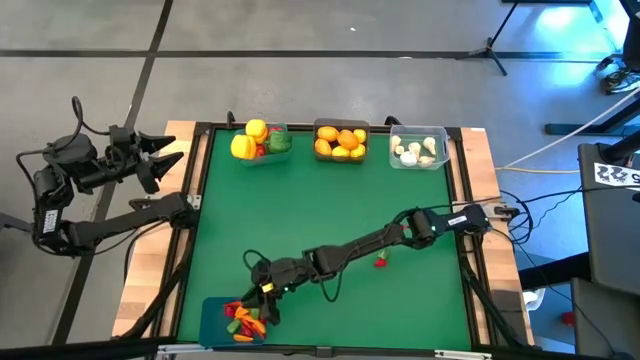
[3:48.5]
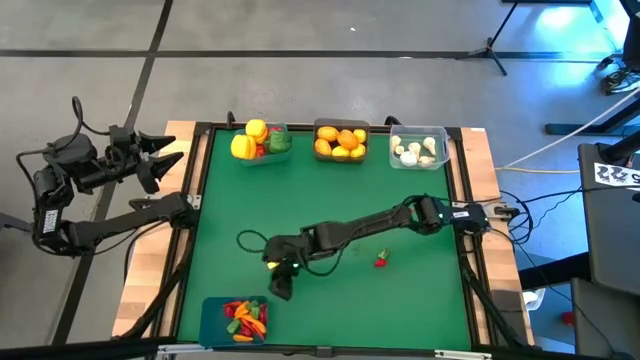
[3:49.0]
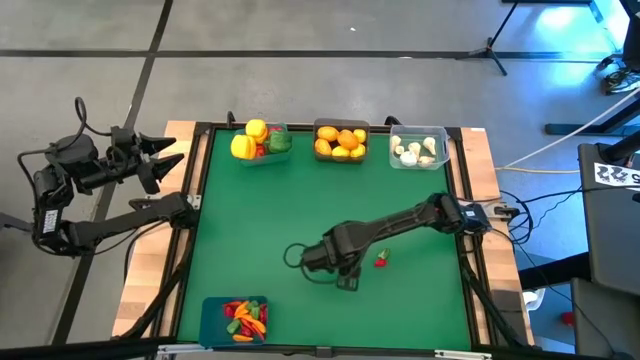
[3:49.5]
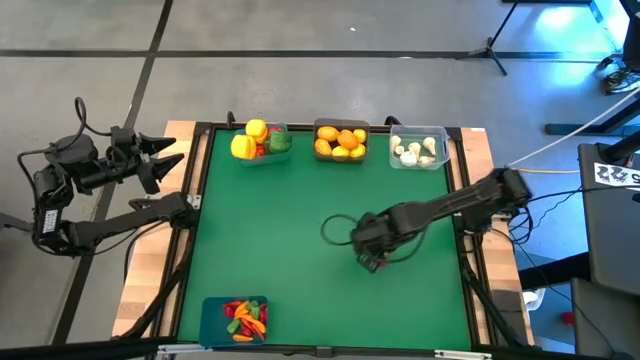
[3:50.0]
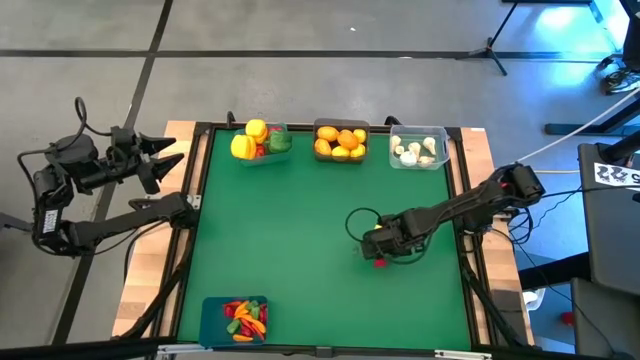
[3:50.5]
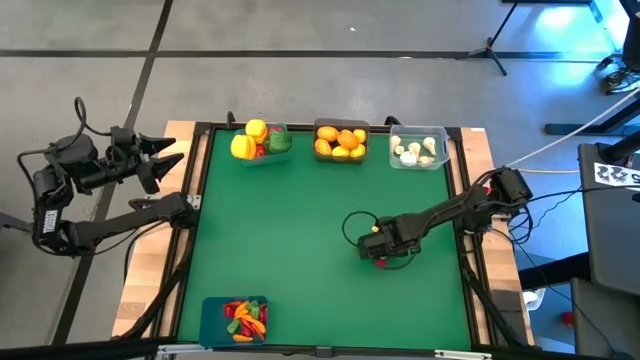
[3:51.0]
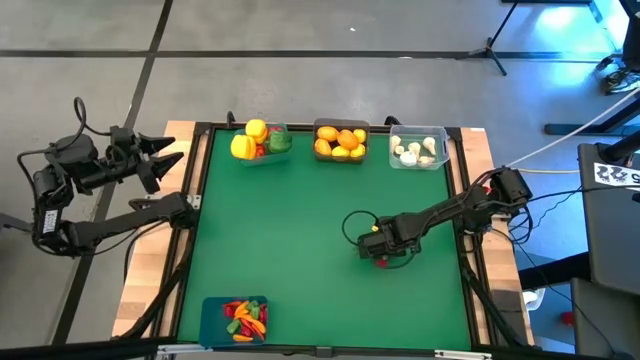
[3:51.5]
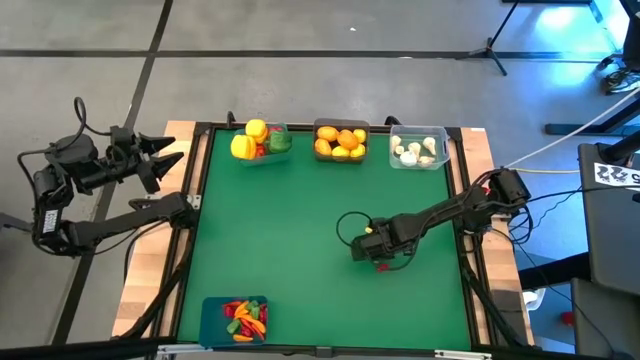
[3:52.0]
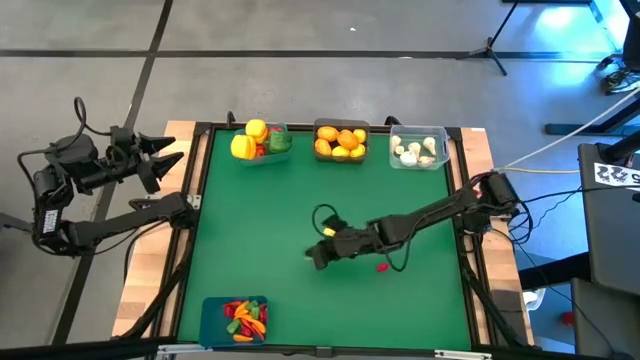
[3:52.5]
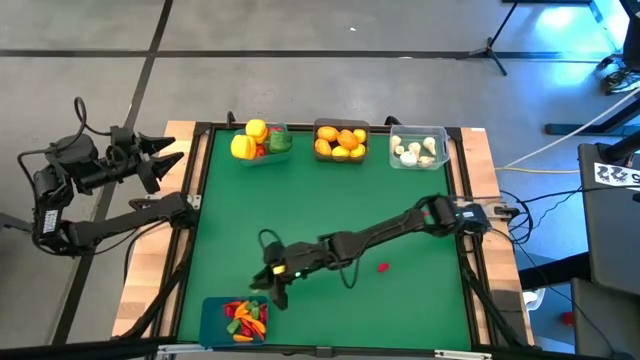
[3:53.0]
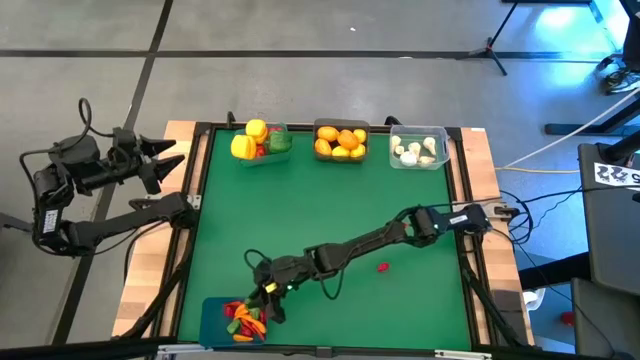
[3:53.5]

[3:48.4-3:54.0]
Task: Sort produce into baskets
Put the green chili pepper into the dark blue bin

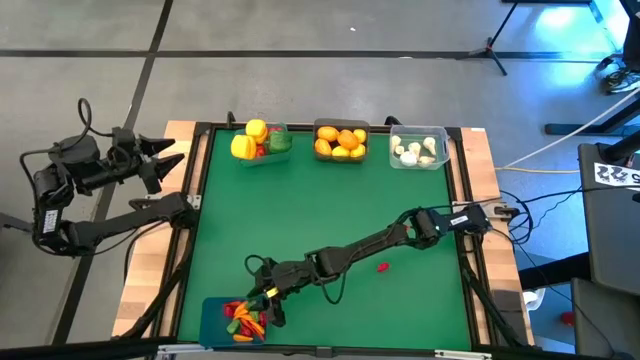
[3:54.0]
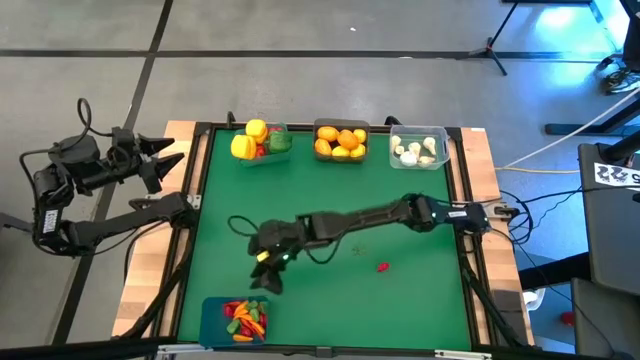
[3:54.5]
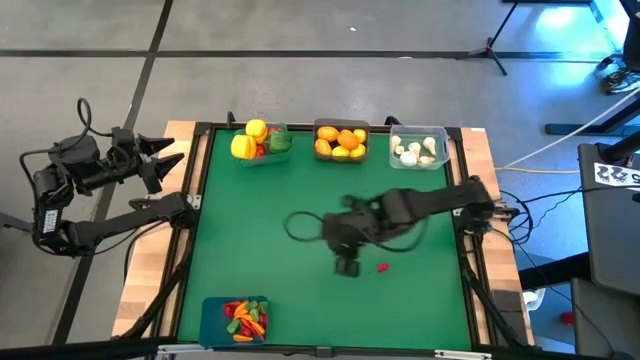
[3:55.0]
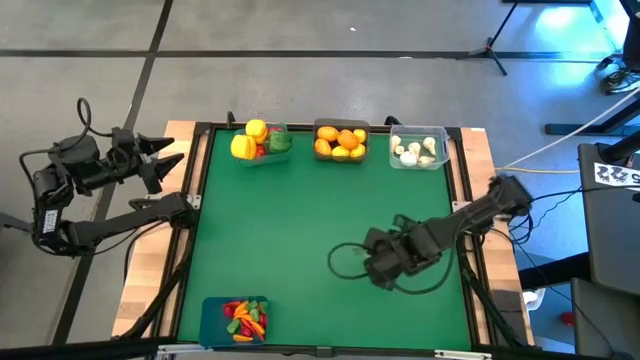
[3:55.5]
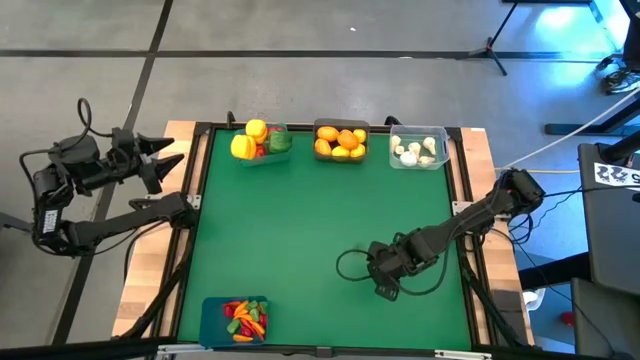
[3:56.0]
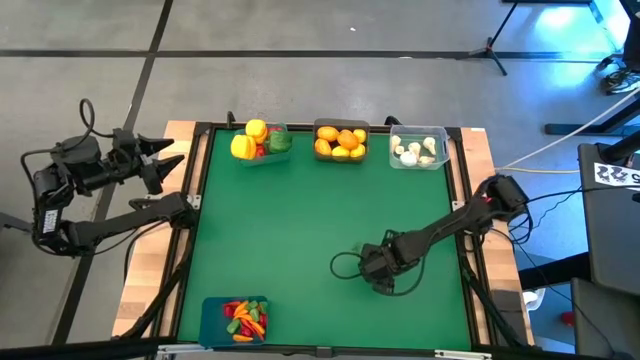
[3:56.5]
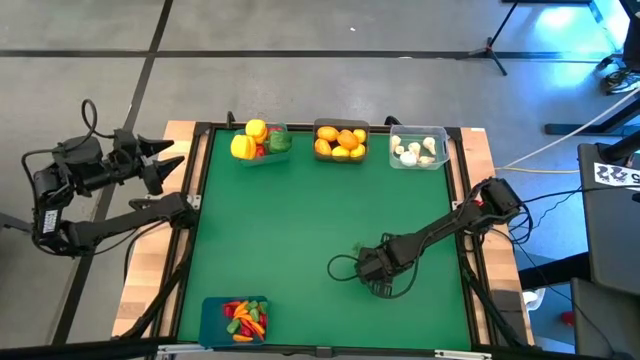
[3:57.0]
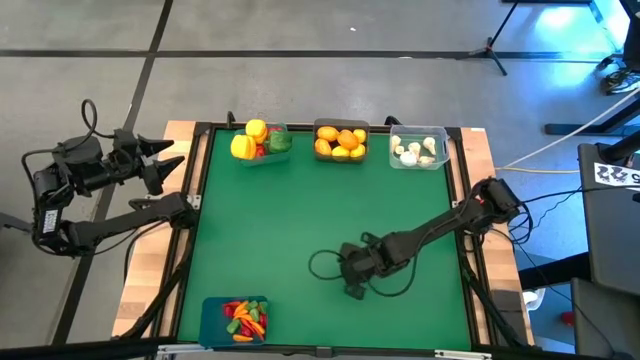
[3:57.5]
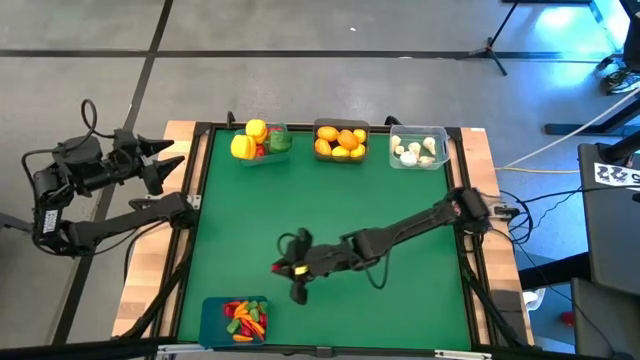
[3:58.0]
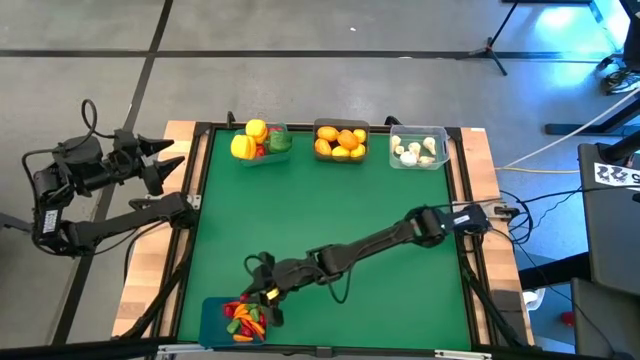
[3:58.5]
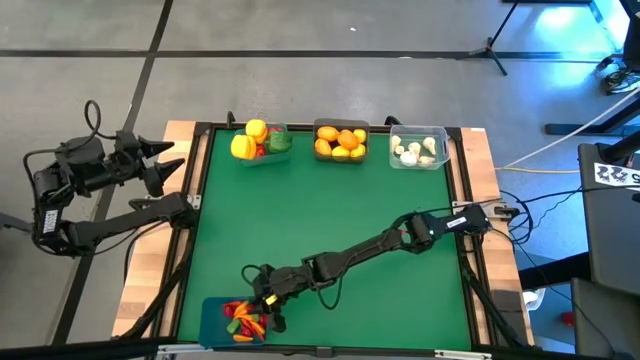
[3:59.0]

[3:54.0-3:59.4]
Put the red chili pepper into the dark blue bin

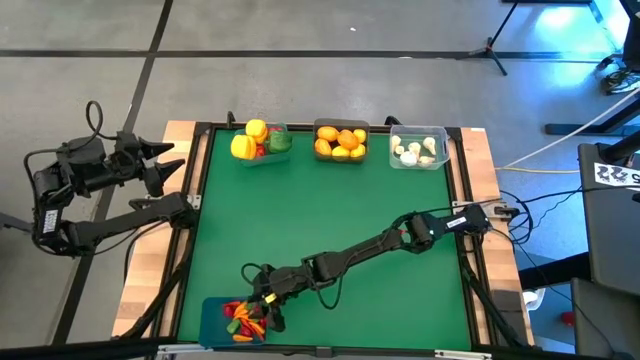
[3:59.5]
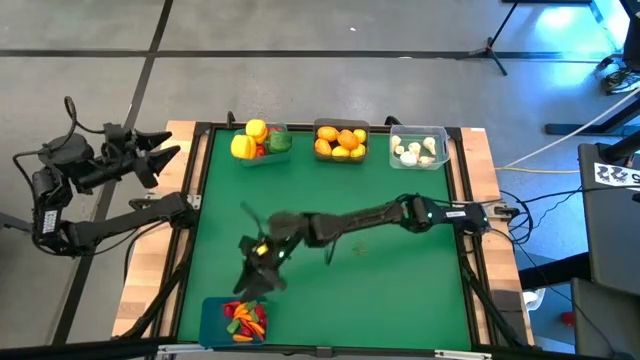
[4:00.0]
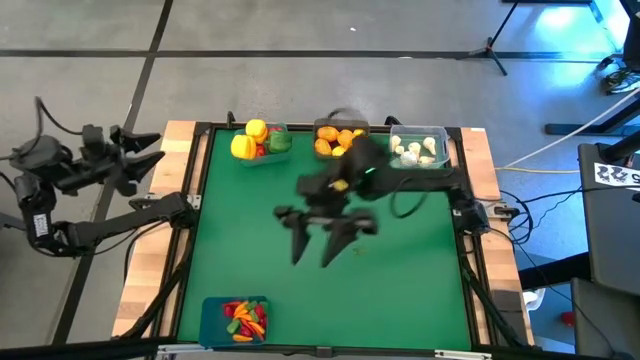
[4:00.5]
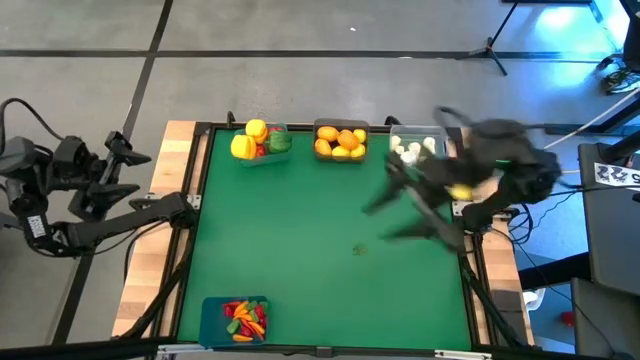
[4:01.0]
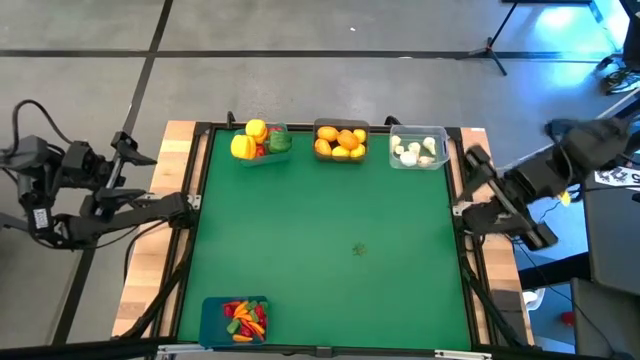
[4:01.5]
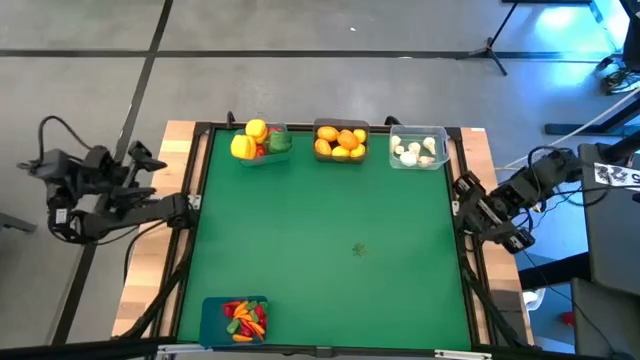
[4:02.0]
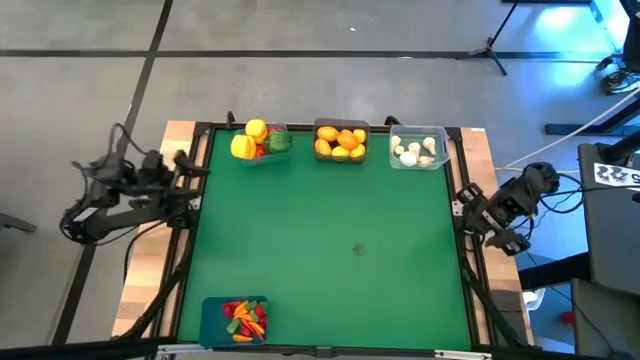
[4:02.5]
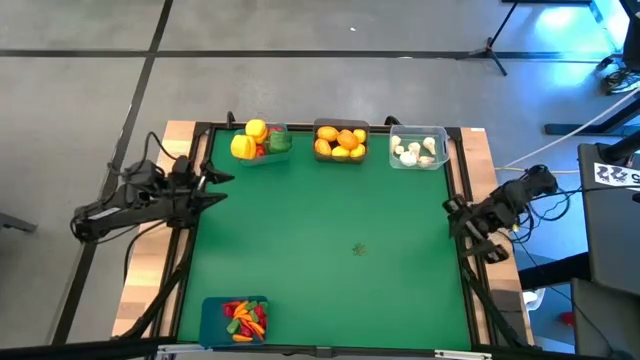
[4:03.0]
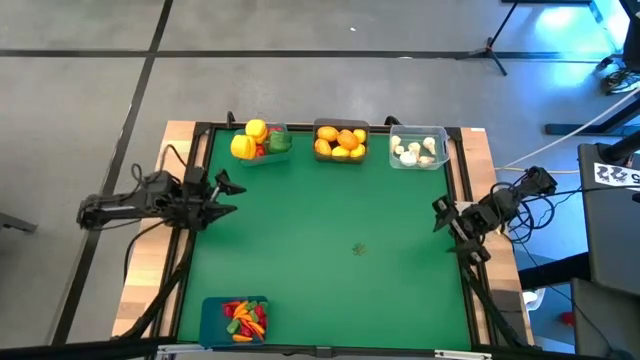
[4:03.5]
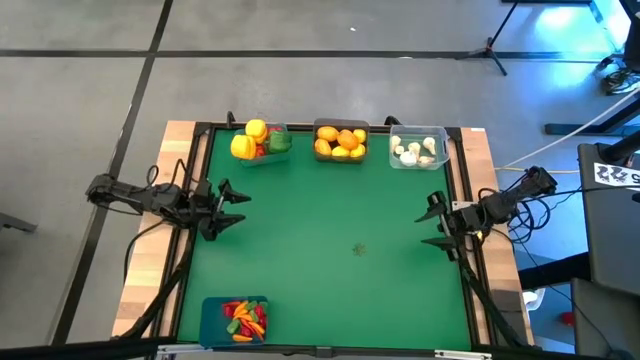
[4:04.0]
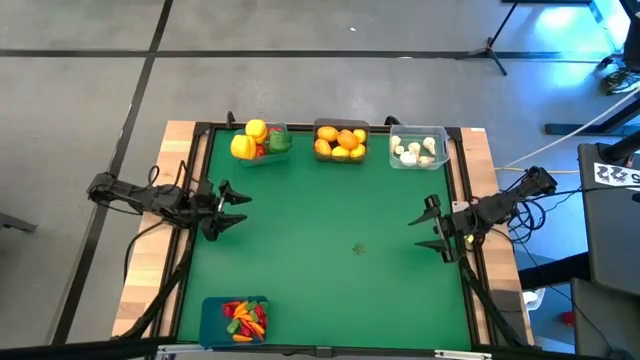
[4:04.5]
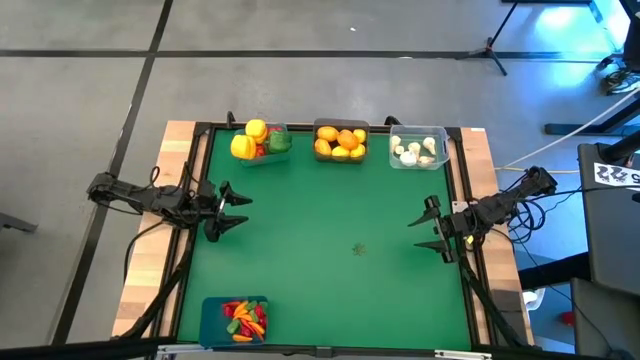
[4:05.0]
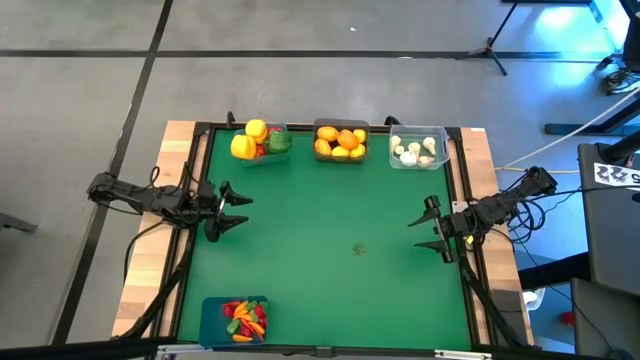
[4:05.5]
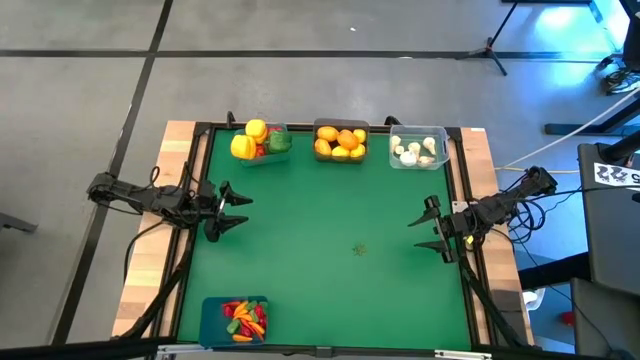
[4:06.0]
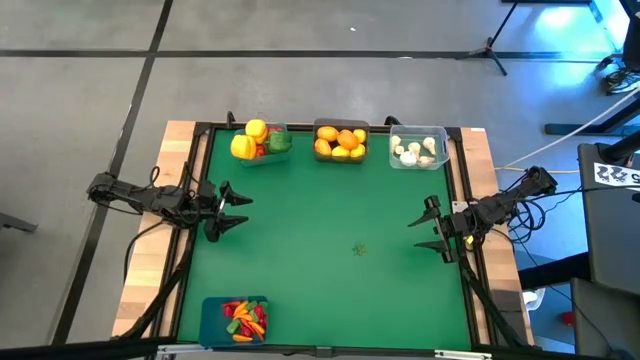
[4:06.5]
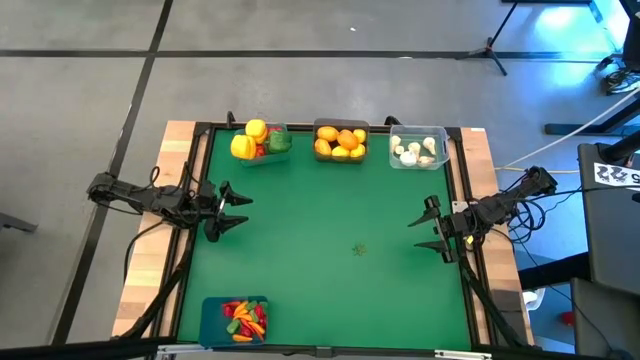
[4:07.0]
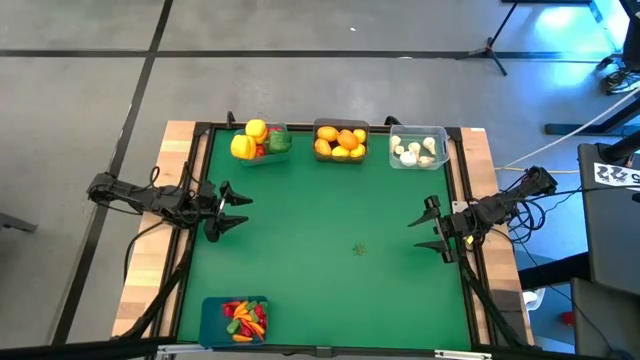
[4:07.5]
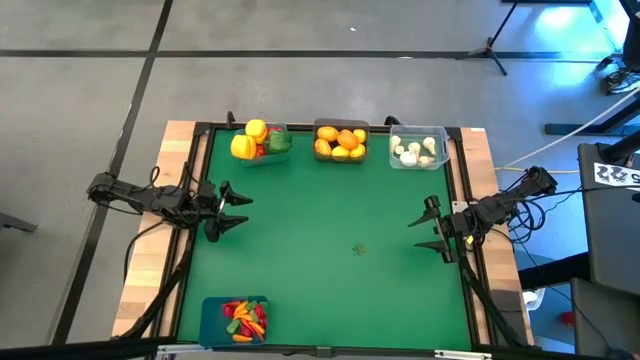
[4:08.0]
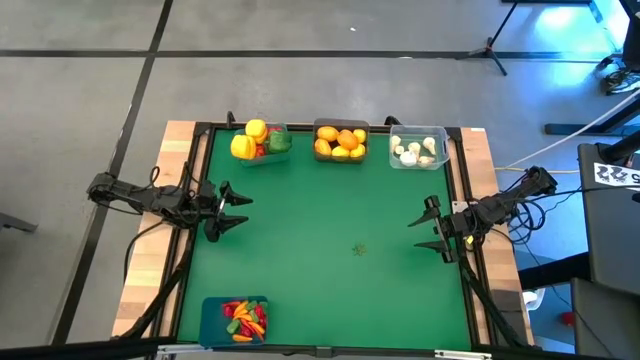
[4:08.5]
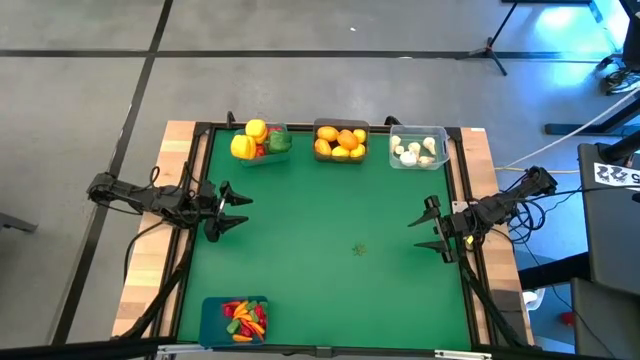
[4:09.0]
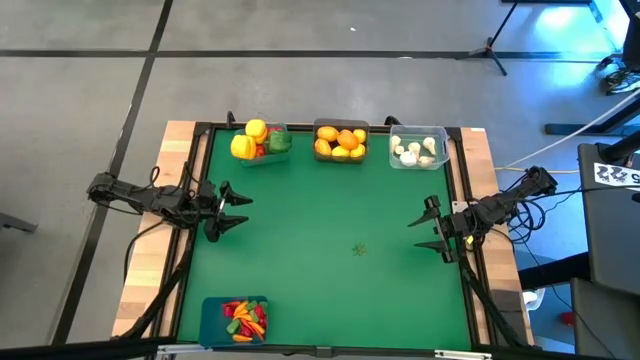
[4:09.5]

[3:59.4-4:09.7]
Return to Home Position
